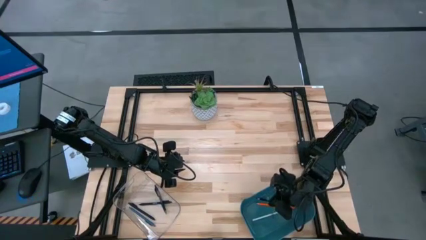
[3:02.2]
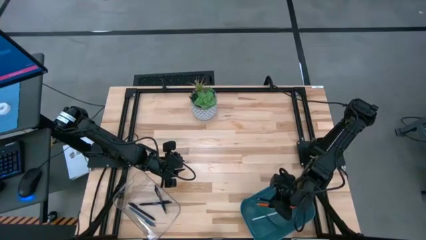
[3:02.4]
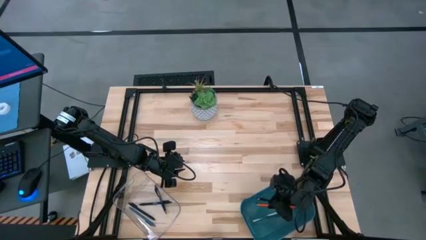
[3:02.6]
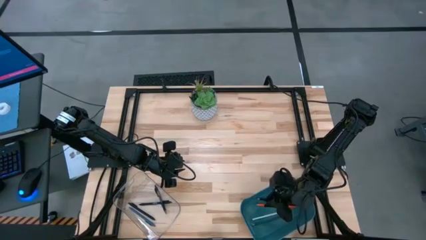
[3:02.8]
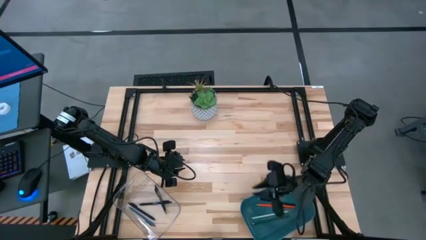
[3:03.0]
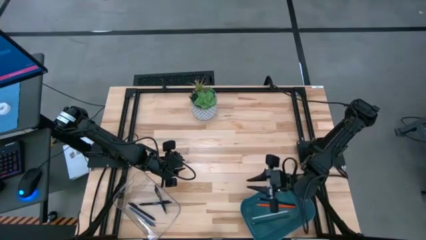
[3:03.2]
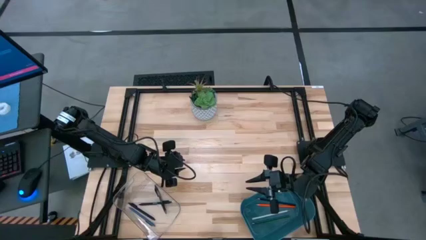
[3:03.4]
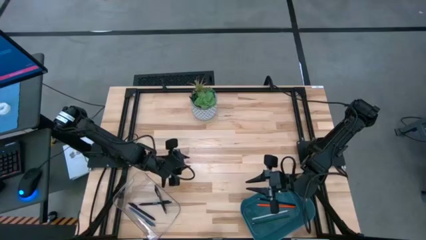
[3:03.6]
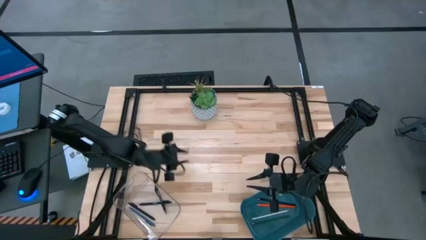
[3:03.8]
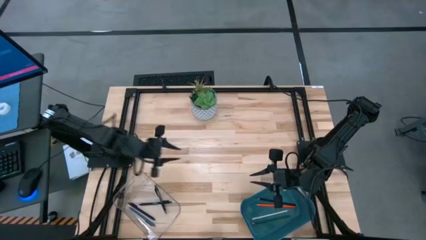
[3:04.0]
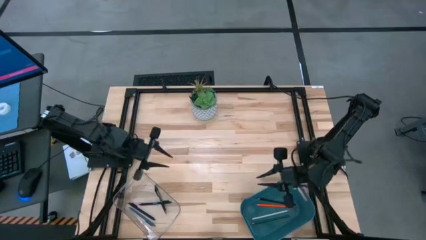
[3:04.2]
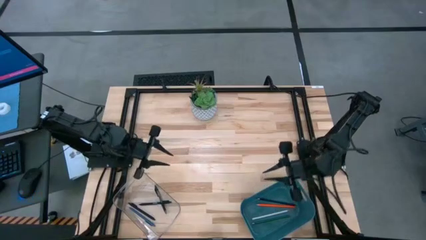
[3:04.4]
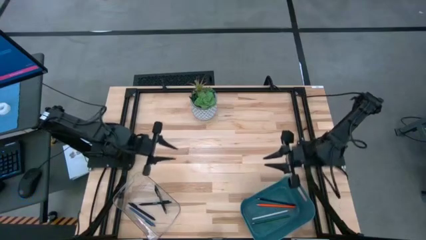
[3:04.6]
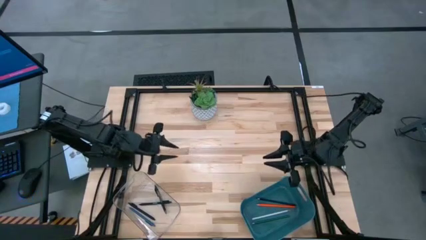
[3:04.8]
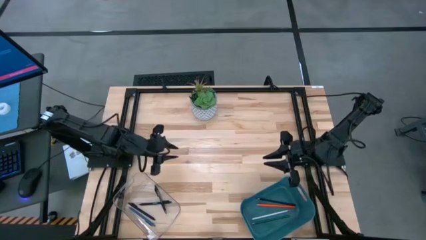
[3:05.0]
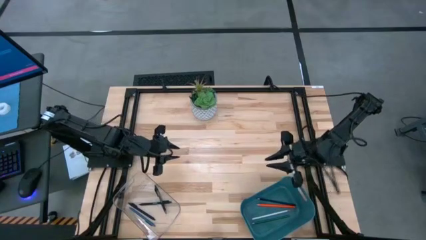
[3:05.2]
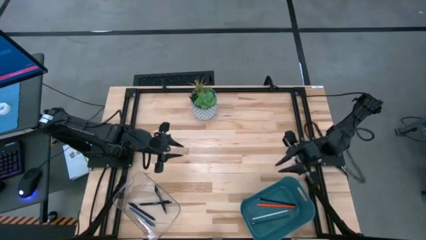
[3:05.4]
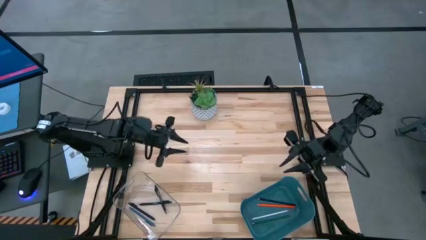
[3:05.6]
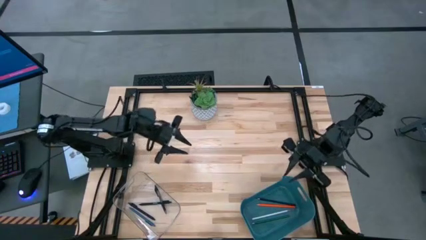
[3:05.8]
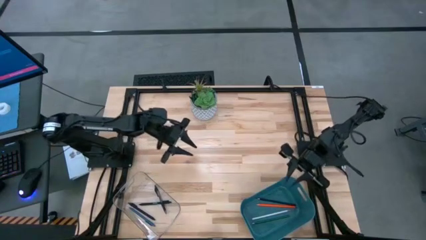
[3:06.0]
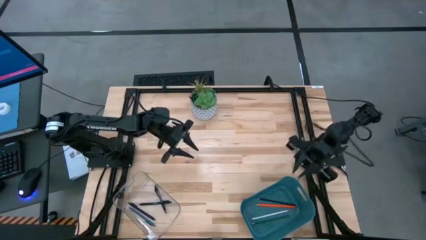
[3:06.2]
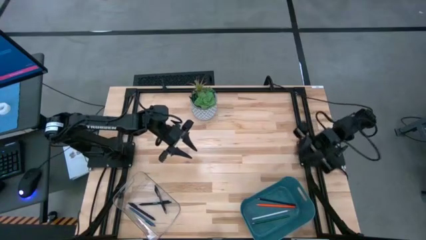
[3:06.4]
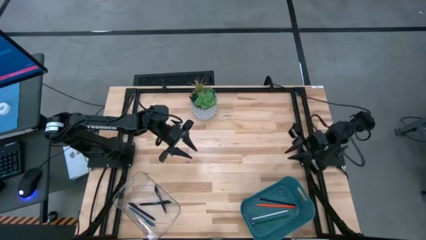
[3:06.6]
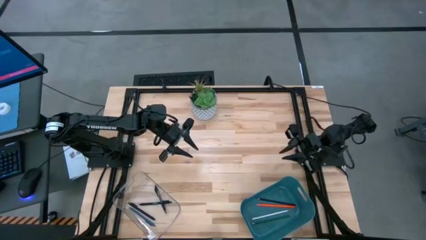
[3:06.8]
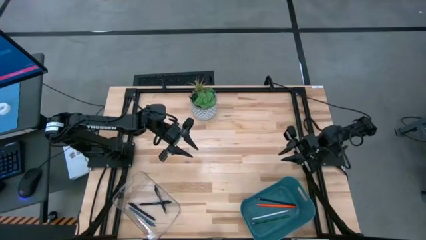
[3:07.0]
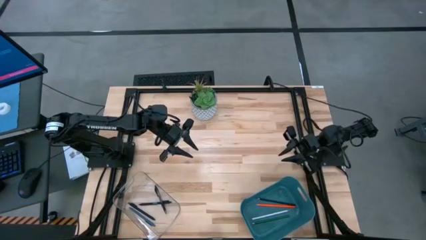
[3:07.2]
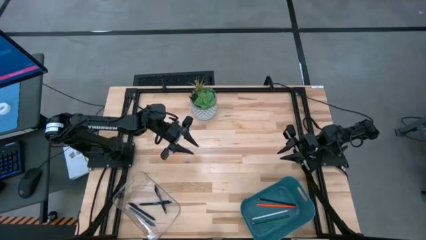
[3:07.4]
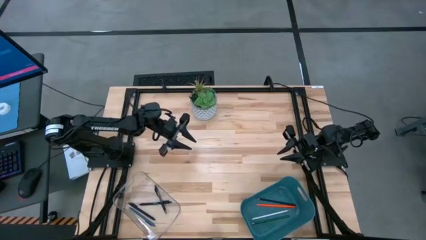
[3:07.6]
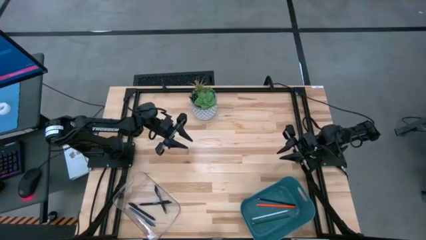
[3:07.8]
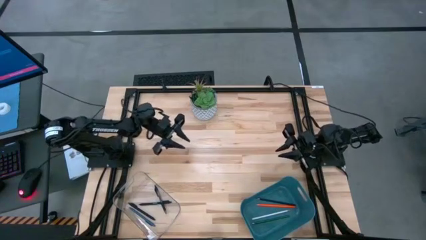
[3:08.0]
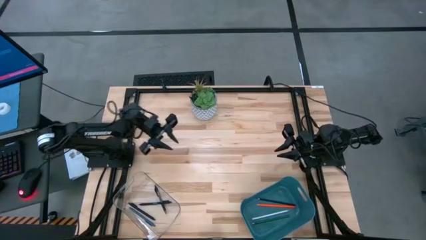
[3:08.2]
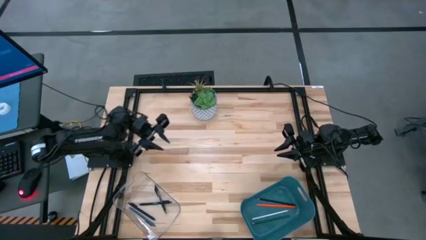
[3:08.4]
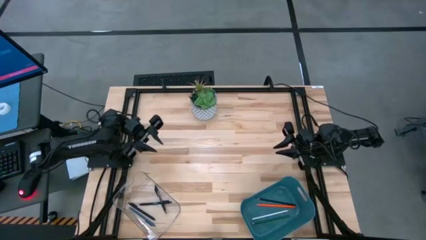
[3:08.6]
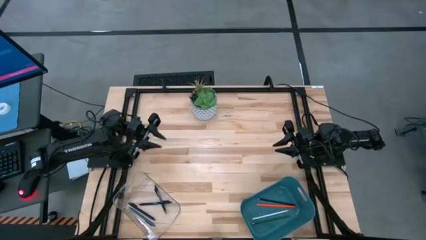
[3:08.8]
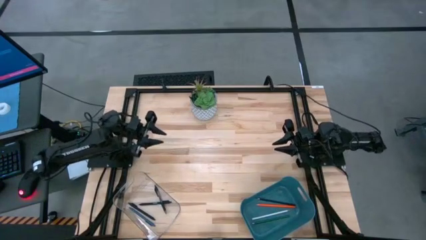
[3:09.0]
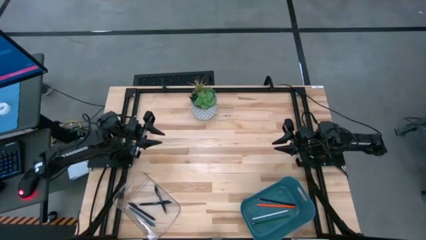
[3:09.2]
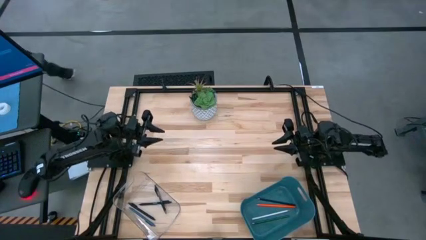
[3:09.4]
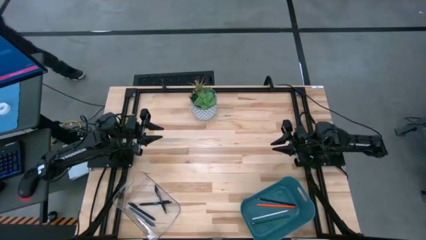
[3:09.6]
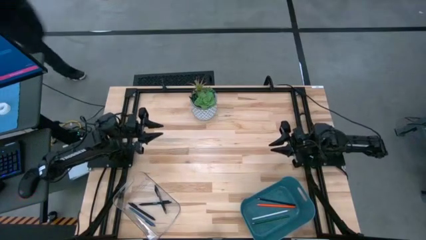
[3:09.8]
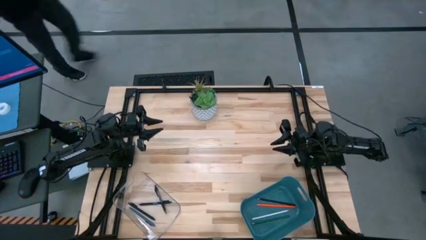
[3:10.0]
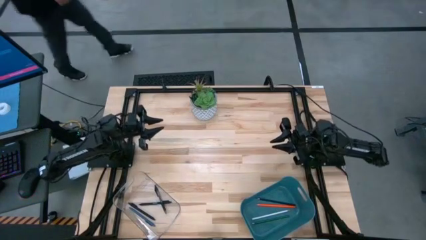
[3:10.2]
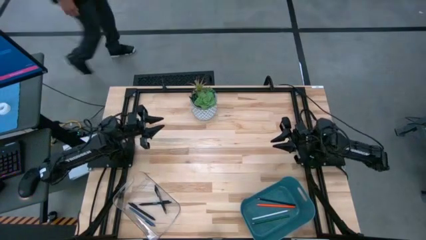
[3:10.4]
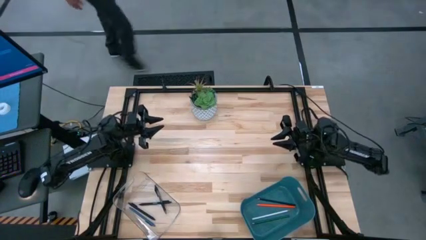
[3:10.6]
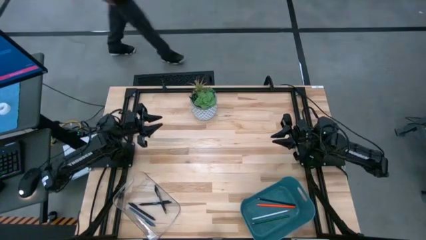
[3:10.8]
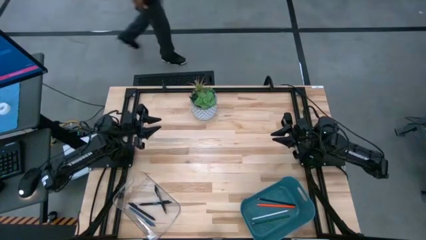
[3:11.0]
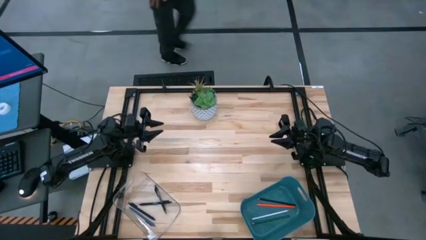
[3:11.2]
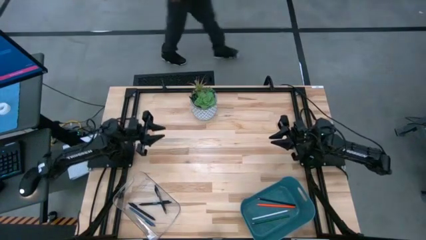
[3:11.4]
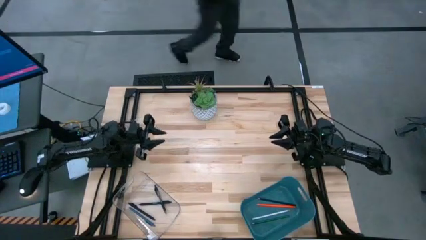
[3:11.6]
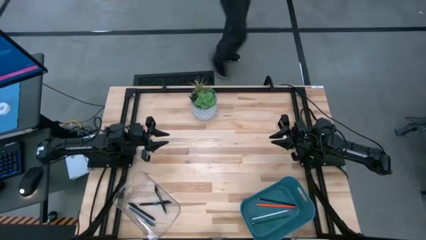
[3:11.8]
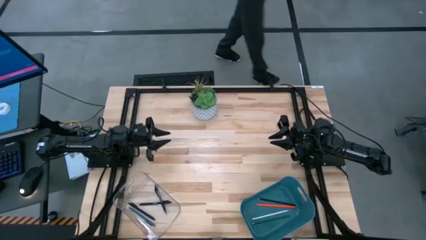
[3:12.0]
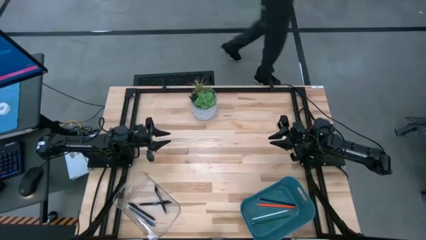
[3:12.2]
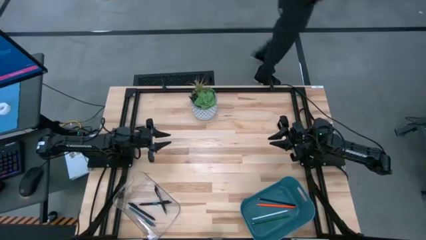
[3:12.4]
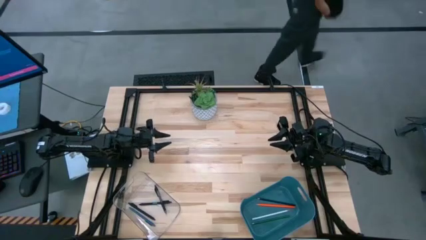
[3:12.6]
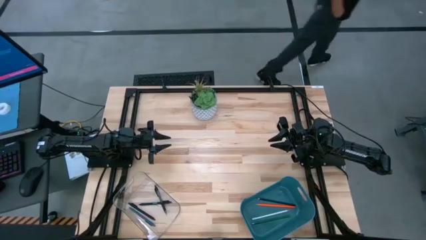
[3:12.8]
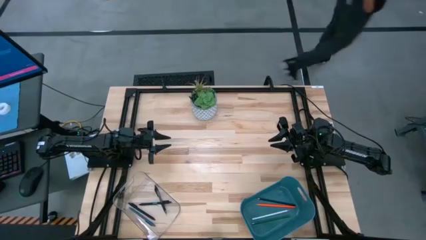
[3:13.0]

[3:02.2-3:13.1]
Task: Sort pens & pencils
Return to Home Position

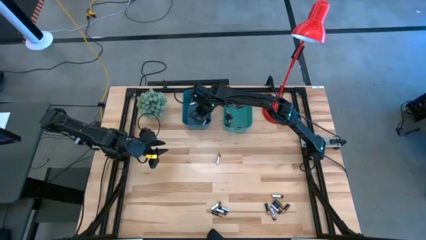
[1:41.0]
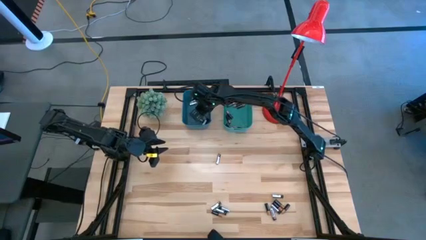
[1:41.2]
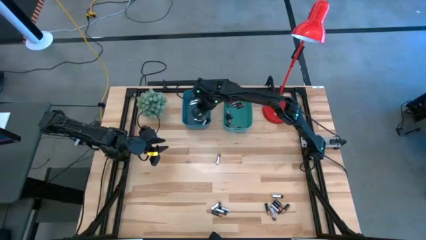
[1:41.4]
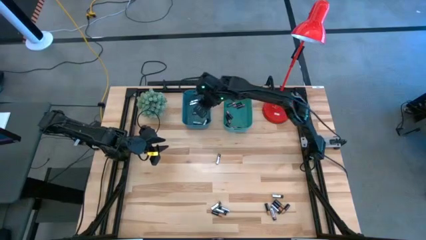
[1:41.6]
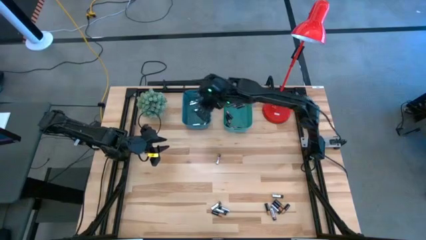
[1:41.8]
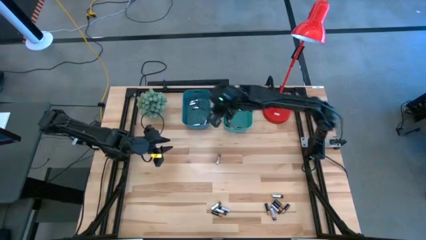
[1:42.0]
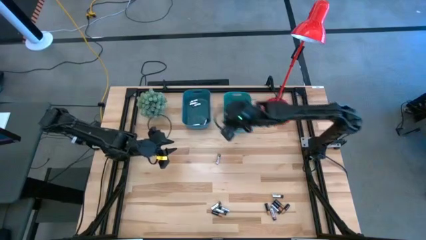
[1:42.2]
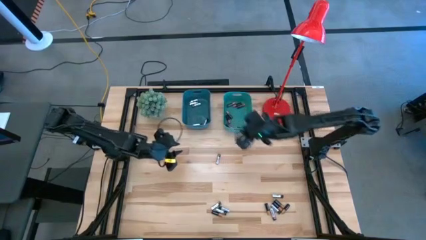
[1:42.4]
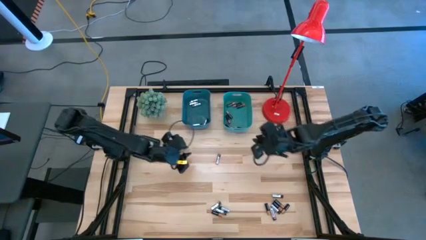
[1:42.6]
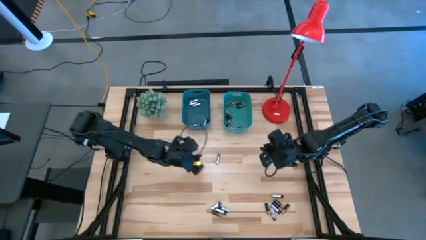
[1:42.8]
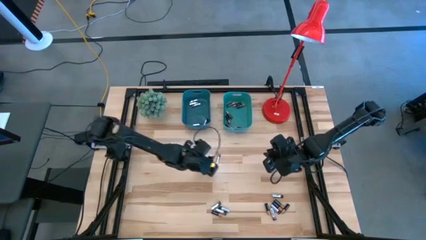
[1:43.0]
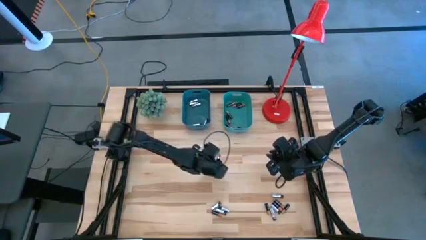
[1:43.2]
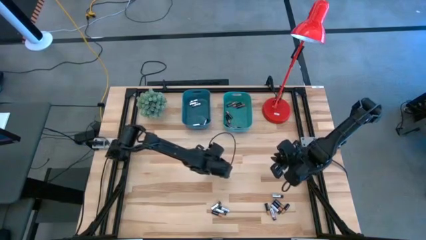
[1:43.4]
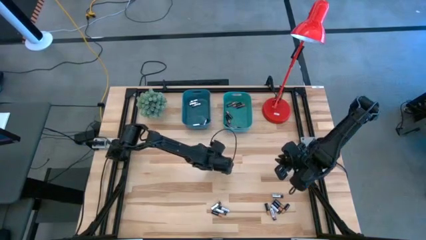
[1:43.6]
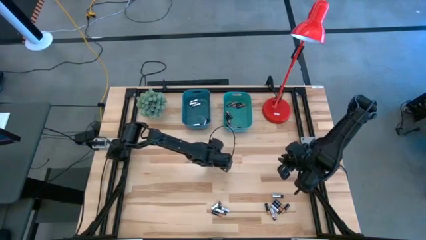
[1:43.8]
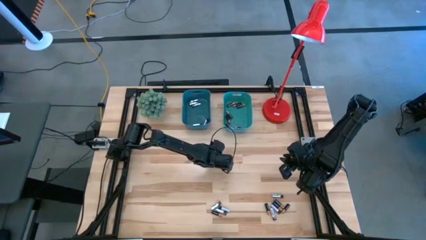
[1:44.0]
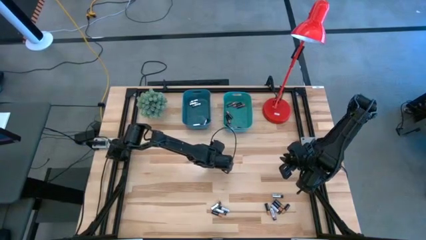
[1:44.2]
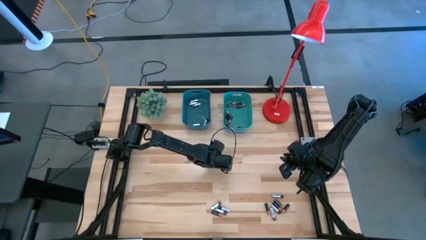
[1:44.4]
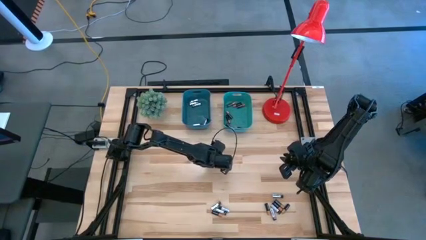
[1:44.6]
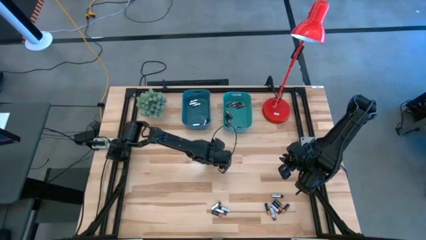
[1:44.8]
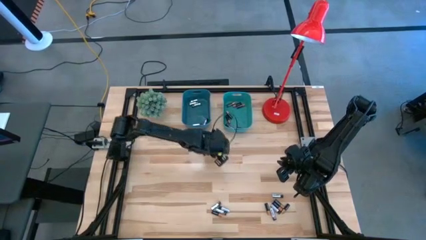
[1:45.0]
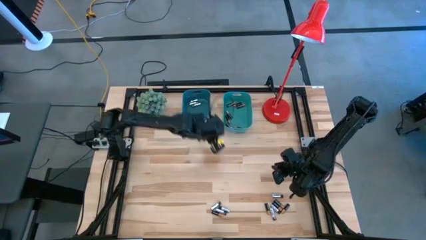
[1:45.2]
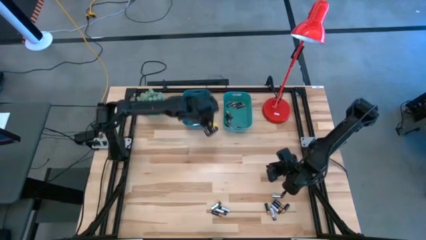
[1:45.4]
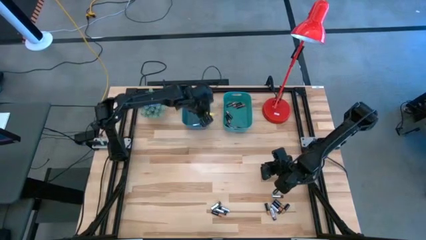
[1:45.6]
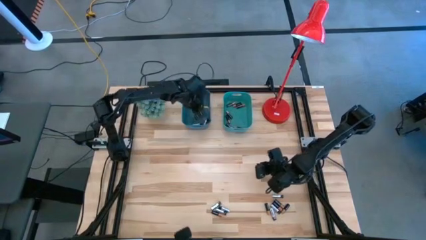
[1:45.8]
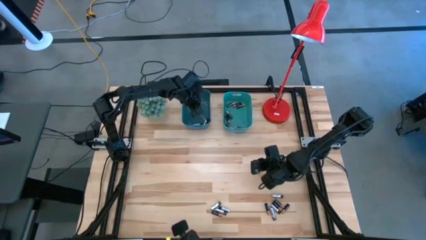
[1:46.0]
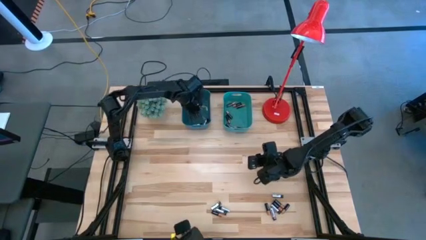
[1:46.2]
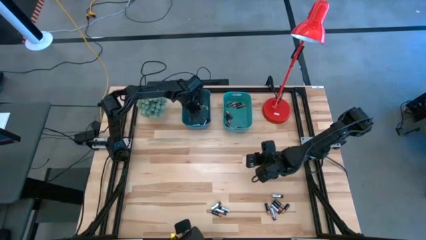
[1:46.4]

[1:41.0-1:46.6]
Task: Sort batteries
Put the silver battery into the blue bin
